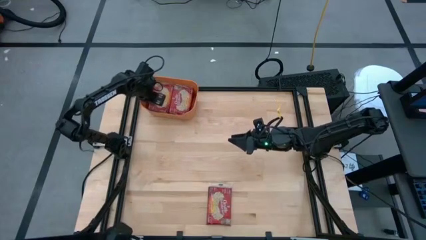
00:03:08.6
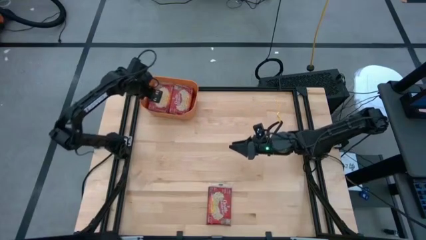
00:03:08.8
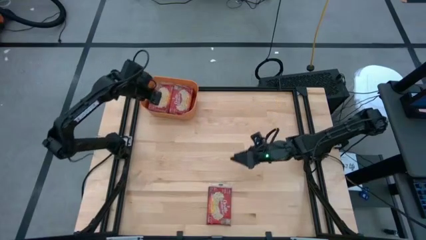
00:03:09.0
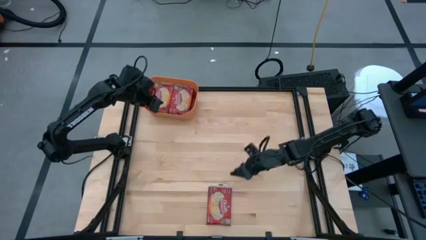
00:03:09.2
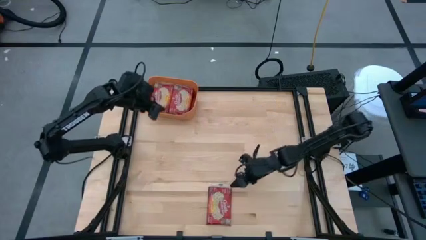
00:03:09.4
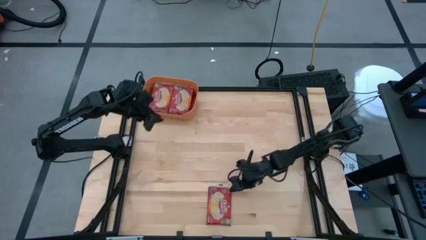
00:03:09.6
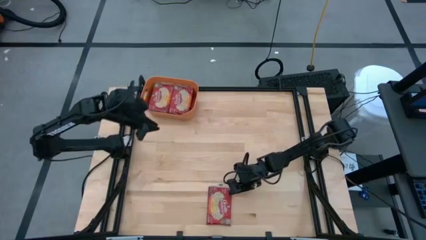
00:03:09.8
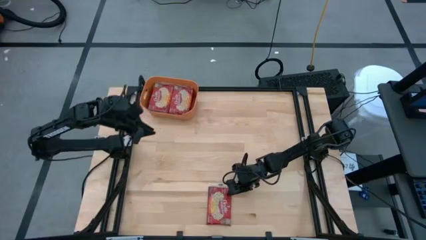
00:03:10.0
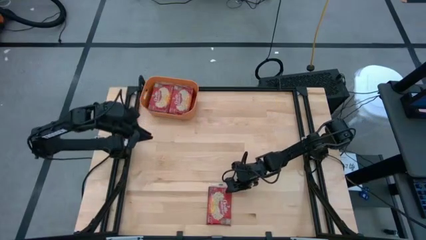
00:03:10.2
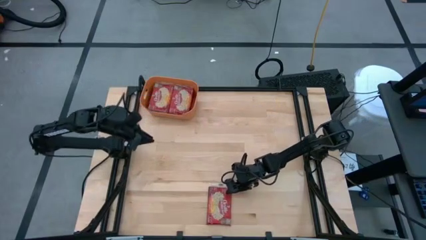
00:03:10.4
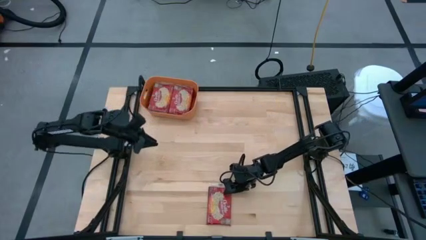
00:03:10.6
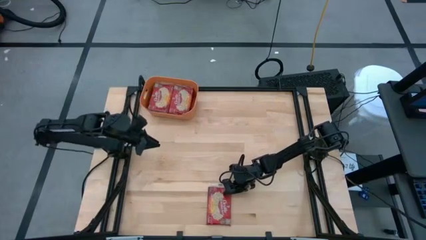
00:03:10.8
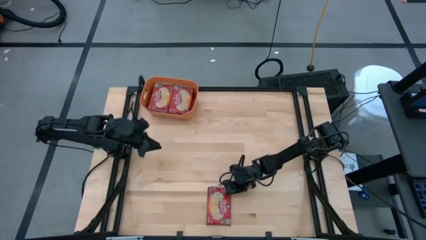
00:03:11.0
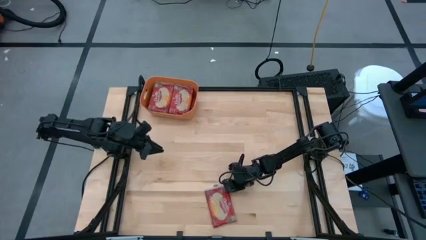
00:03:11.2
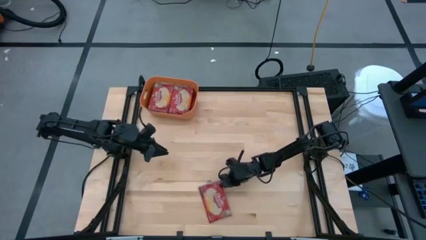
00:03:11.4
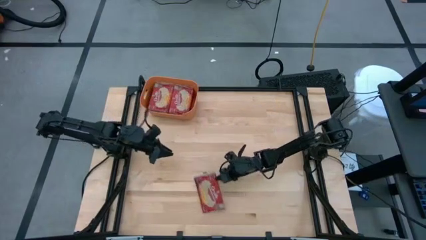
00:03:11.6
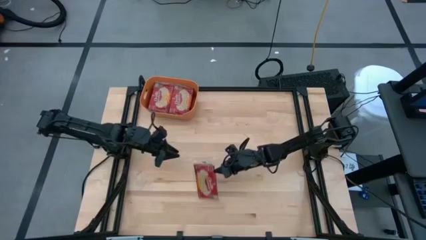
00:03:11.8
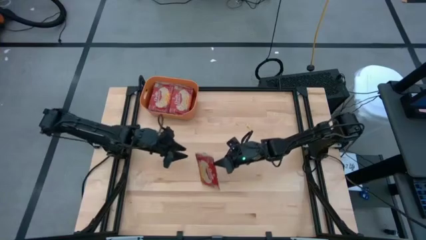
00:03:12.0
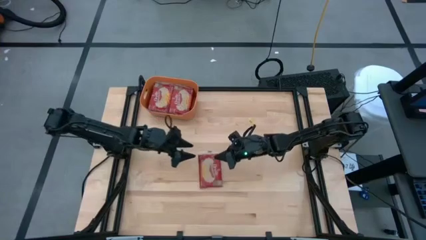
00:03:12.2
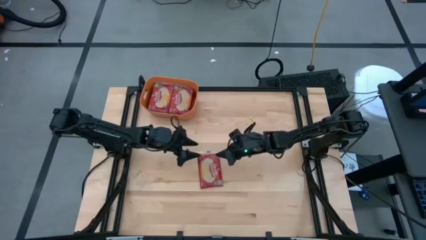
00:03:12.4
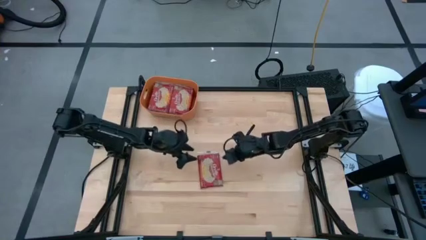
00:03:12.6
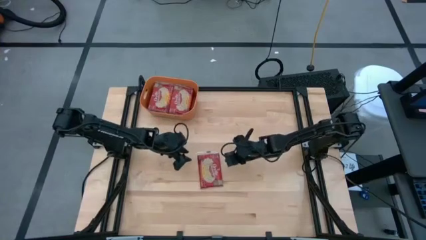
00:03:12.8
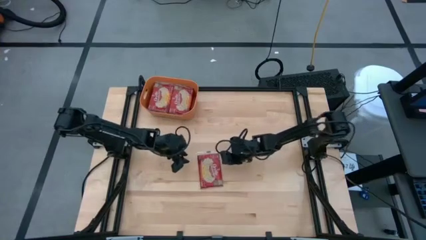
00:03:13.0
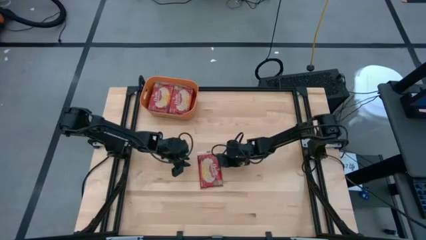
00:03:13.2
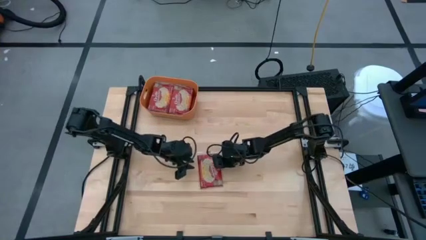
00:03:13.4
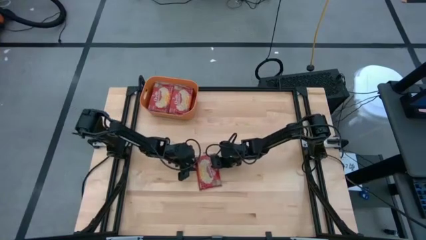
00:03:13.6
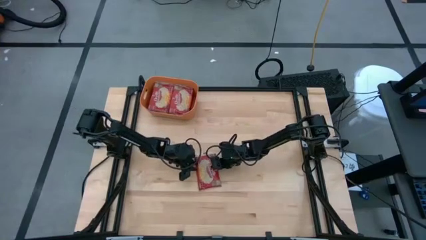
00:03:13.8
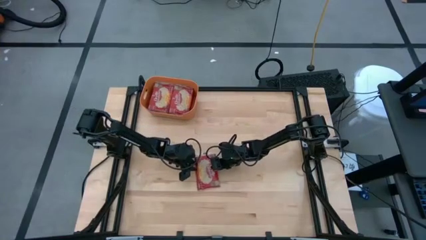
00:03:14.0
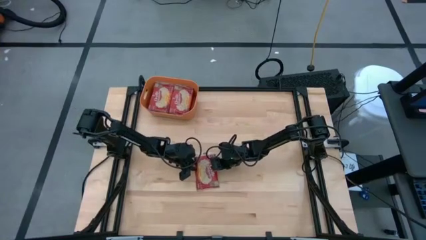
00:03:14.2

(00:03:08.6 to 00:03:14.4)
Task: Sort popcorn bags into baskets
Stack the red popcorn bag on top of the red popcorn bag in the orange bin
